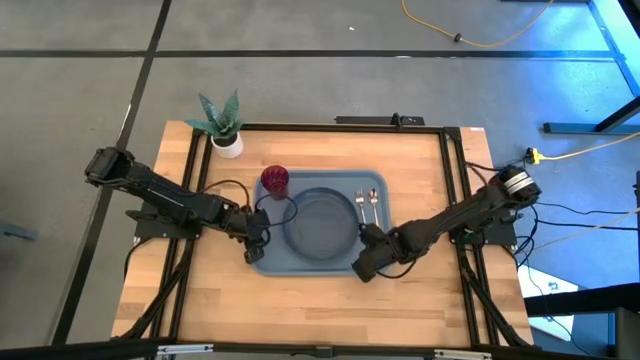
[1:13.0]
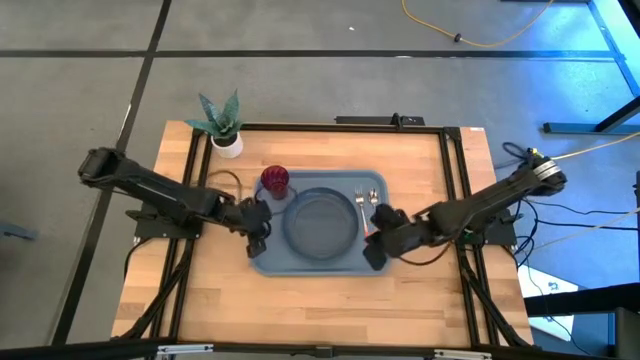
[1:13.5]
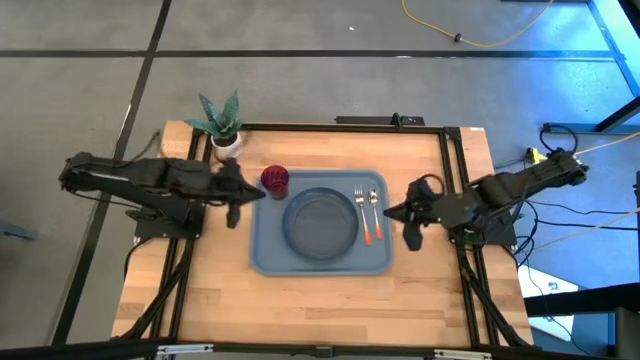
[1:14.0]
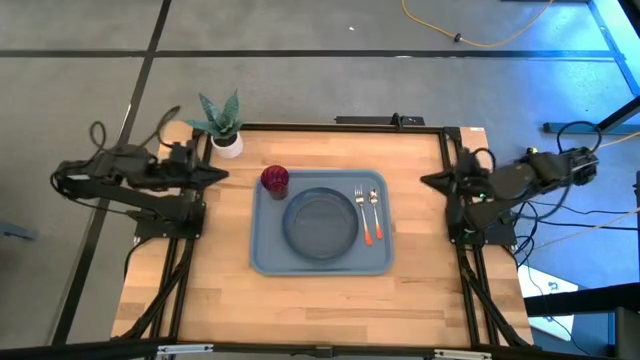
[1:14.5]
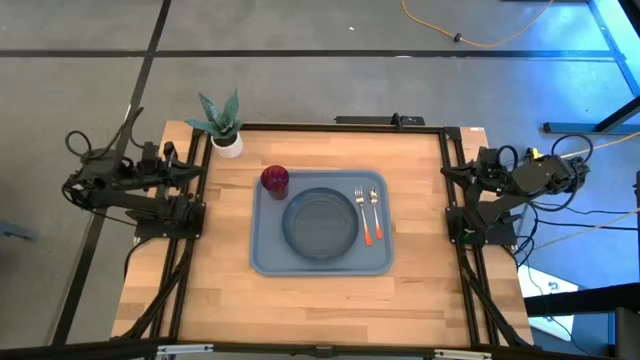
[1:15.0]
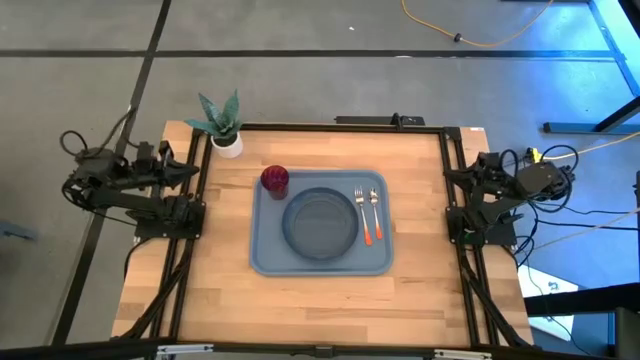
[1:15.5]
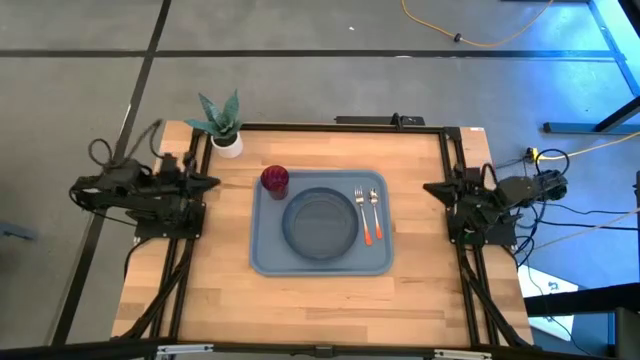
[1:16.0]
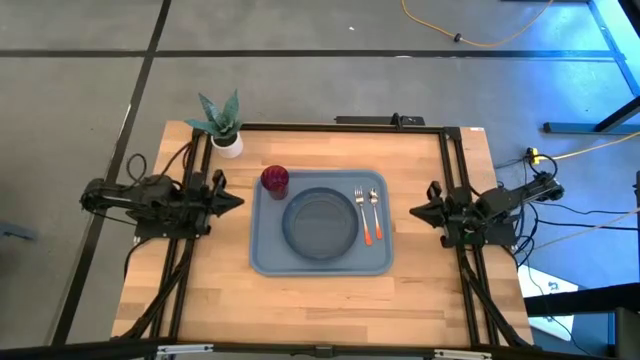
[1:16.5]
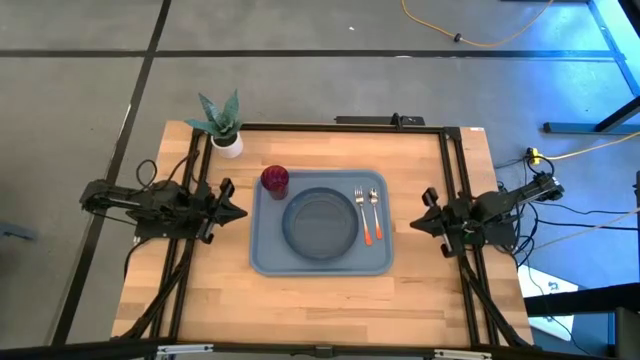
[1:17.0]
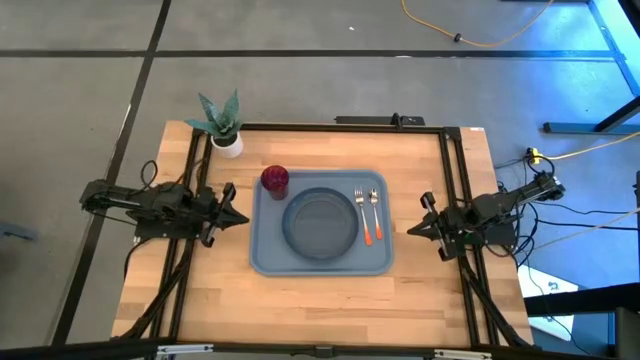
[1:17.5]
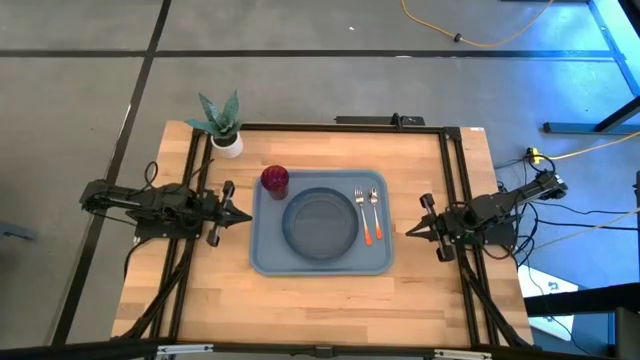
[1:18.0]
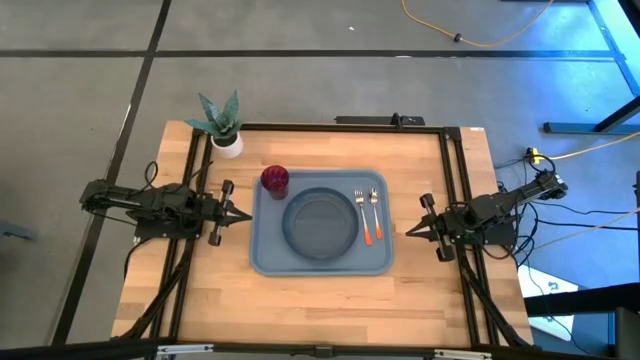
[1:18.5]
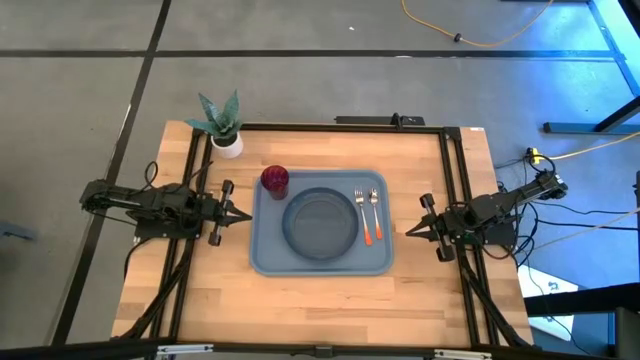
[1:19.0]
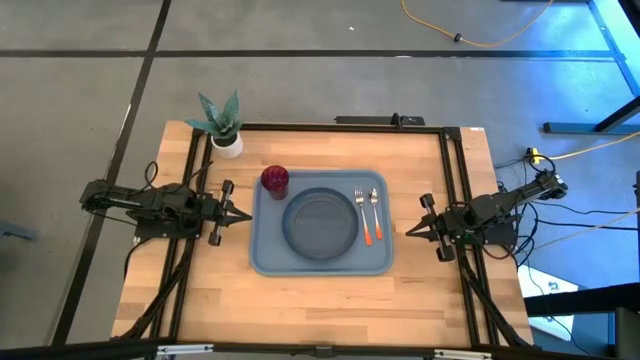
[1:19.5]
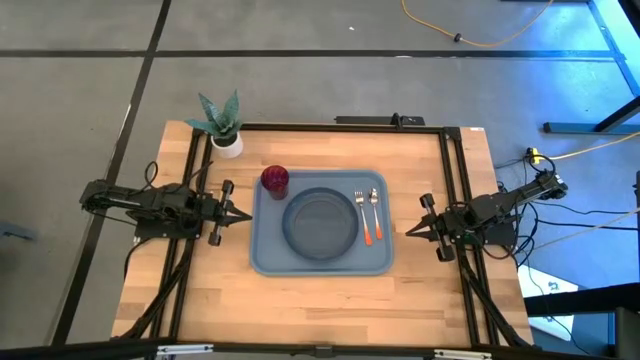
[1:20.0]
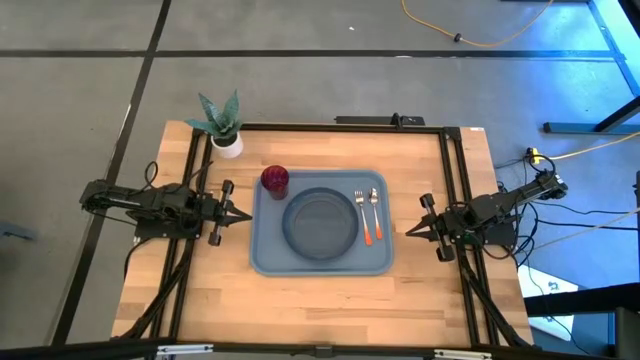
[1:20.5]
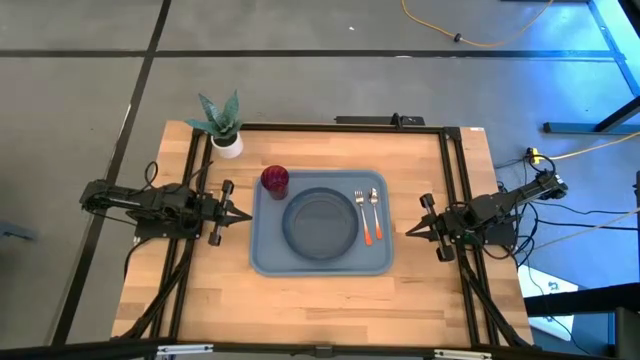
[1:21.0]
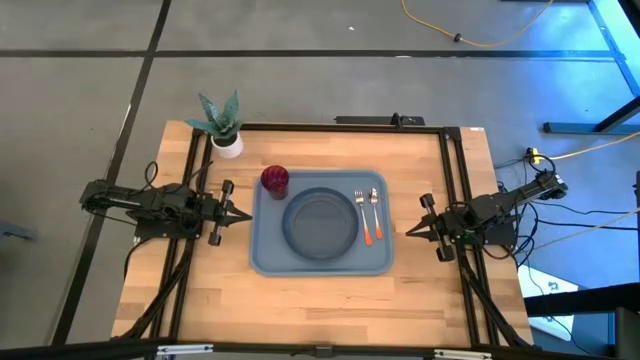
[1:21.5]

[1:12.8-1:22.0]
Task: Pick and place plate/cup/fork/spoon on tray
Return to Home Position

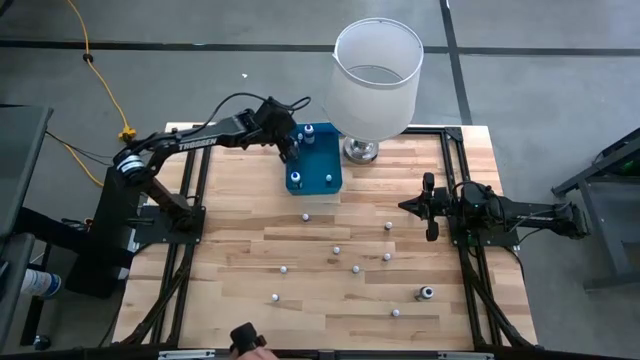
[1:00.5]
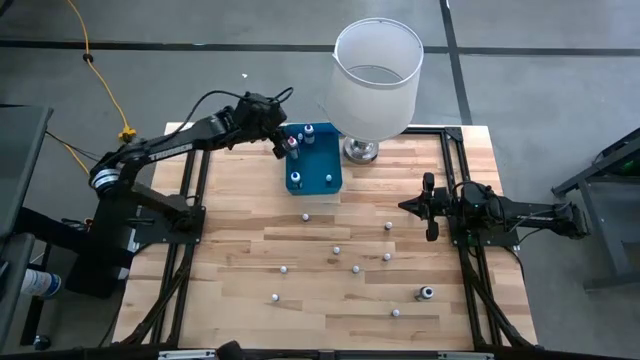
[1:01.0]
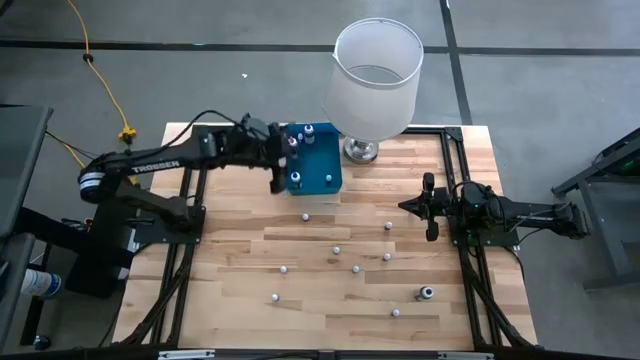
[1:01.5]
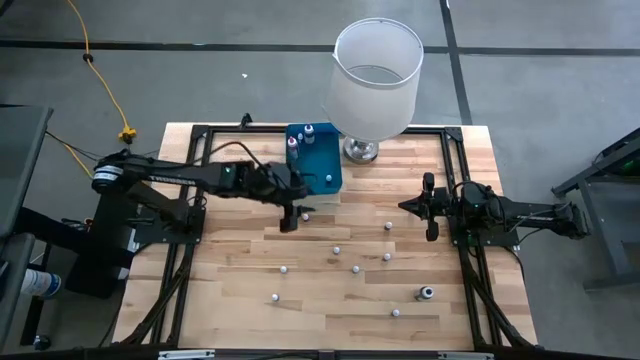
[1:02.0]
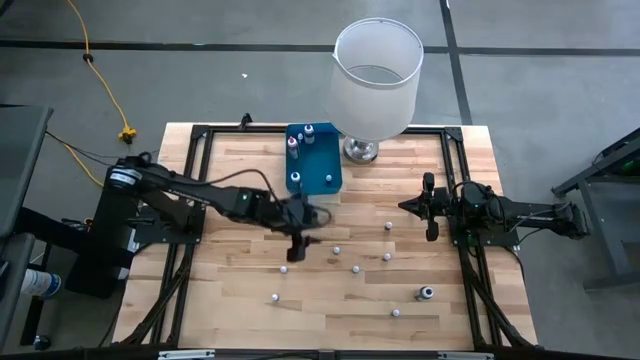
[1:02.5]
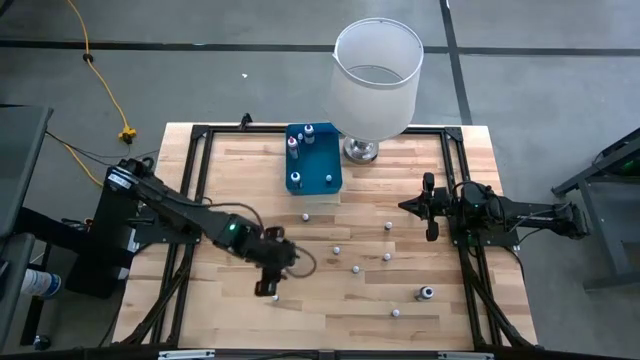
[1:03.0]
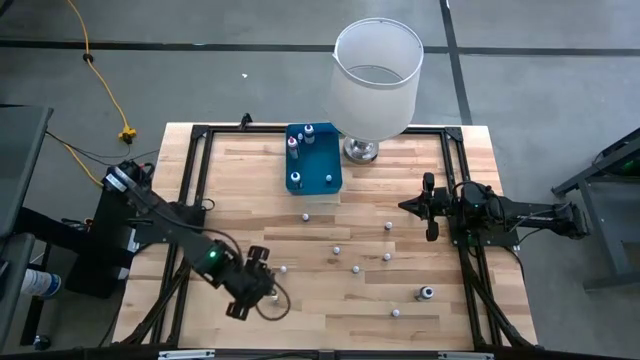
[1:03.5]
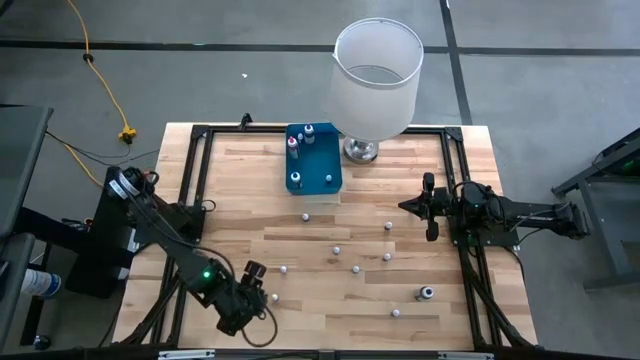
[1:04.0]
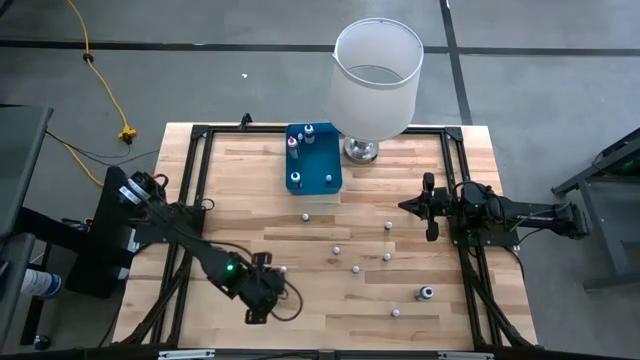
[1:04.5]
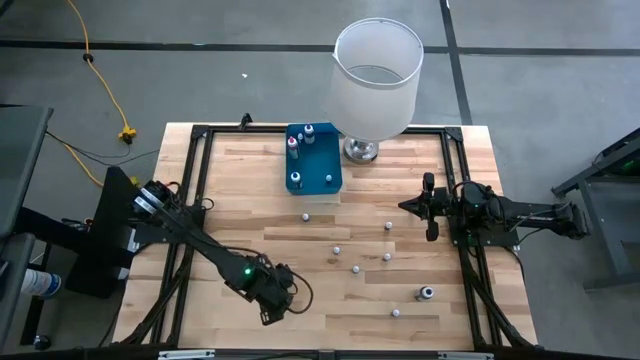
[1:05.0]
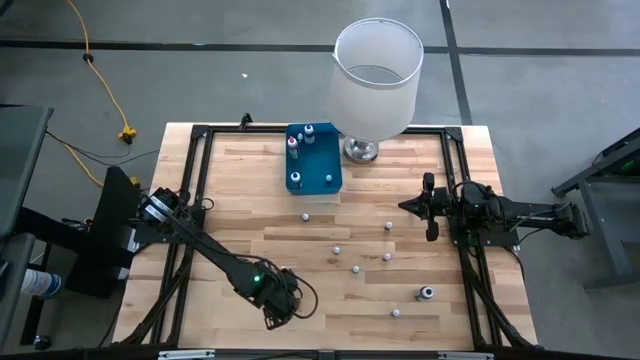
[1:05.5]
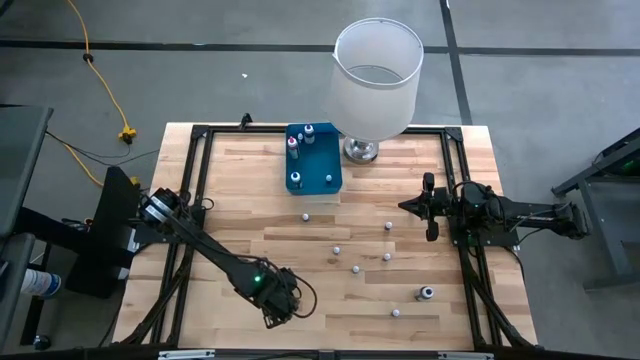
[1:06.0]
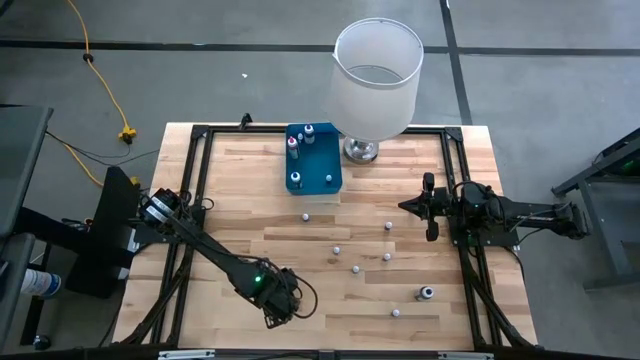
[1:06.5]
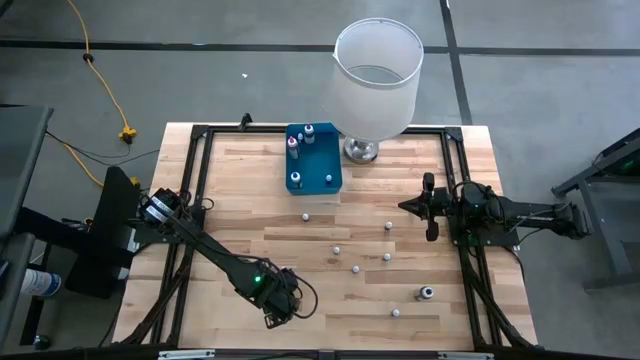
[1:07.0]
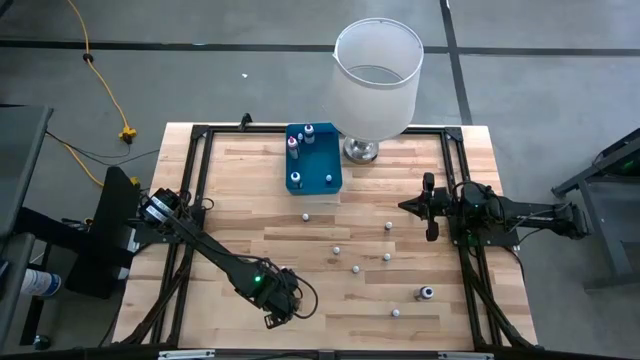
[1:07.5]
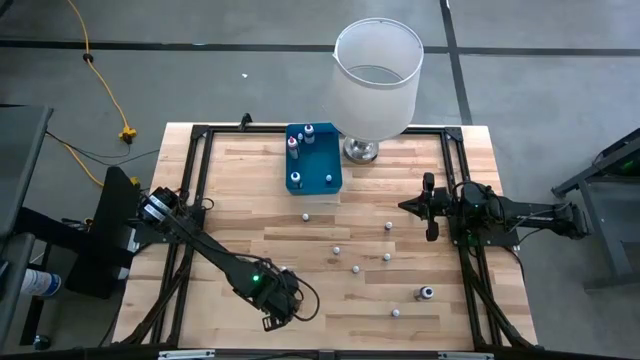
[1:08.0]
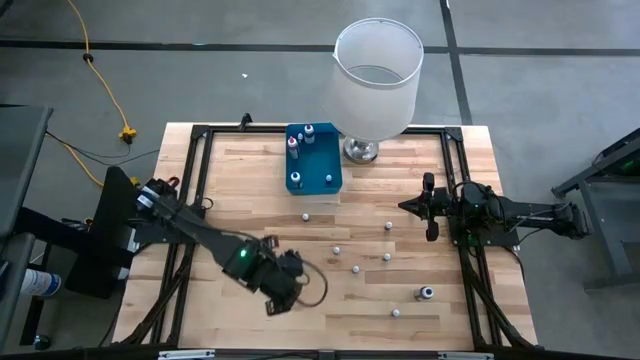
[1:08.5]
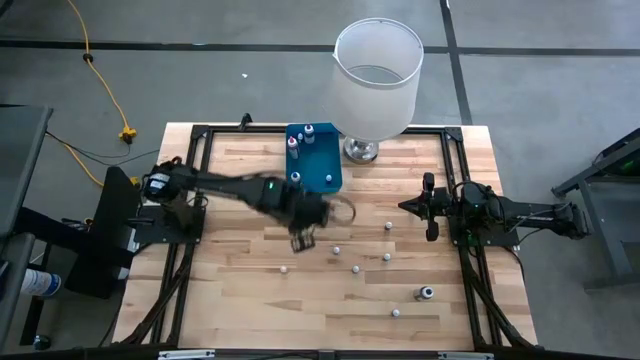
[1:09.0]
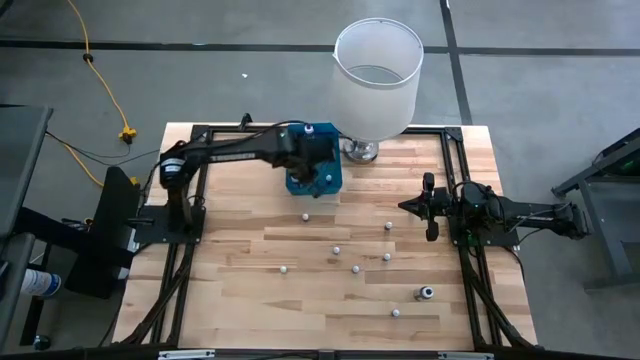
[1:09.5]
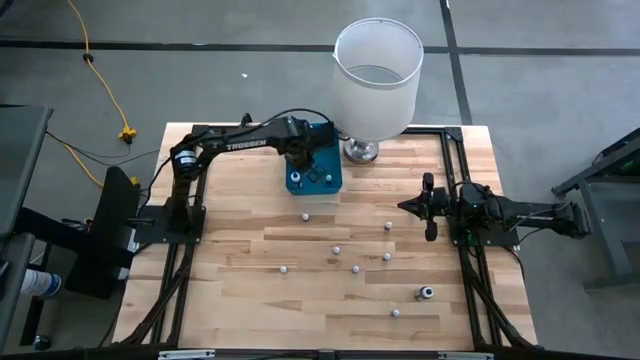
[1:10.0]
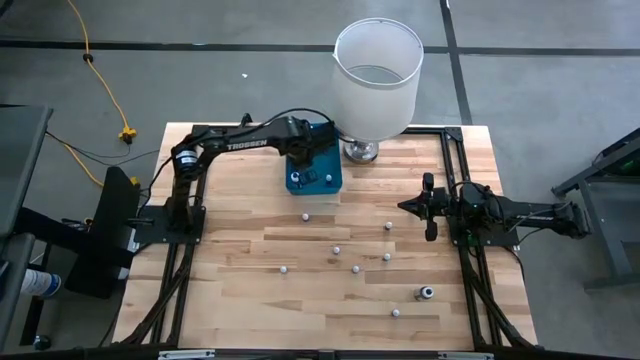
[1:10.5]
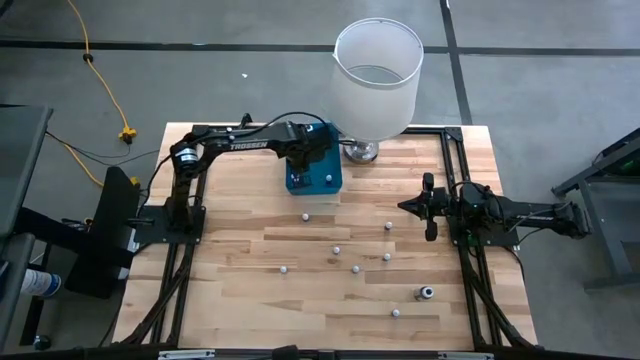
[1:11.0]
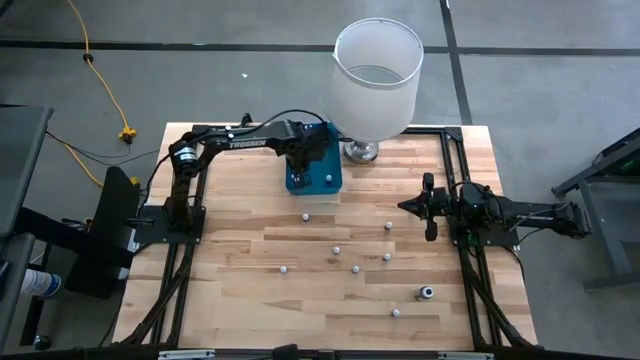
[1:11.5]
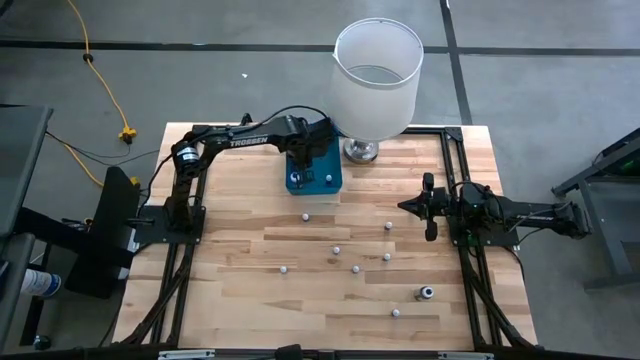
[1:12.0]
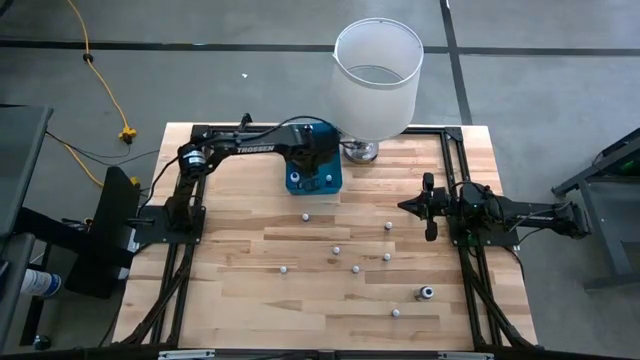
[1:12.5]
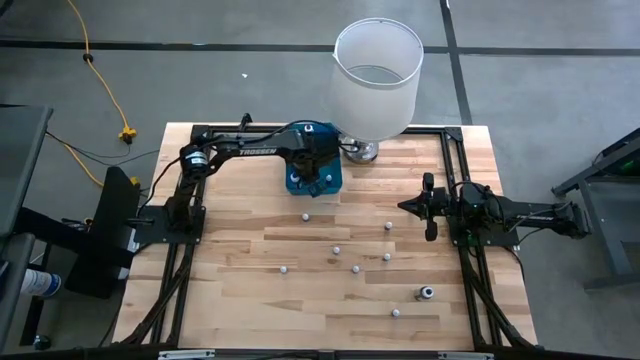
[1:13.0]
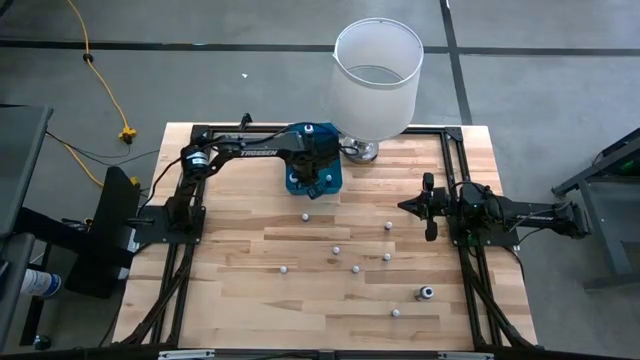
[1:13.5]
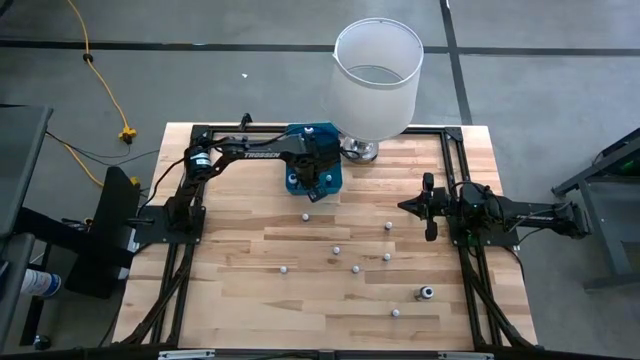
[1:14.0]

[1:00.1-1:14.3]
Task: Pick & Place food coloring
Put the left small red food coloring bottle into the blue bin
